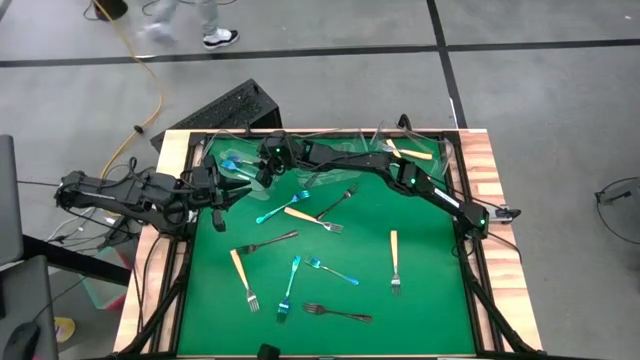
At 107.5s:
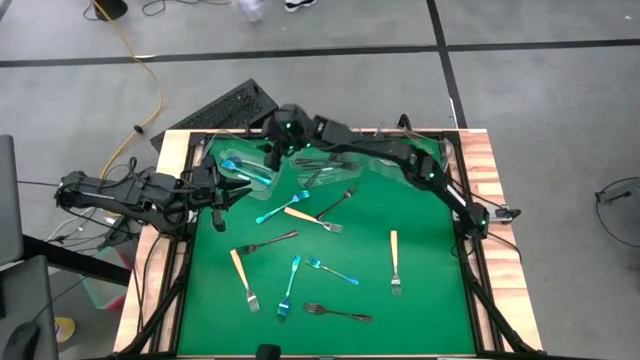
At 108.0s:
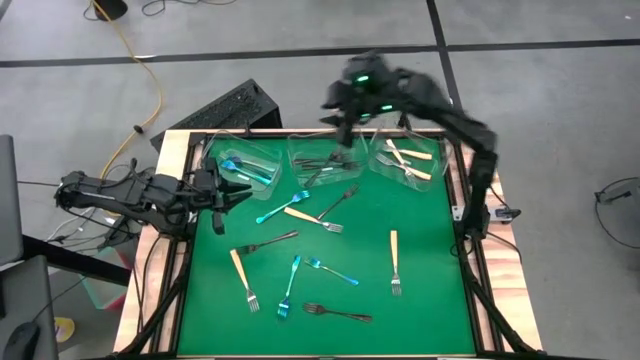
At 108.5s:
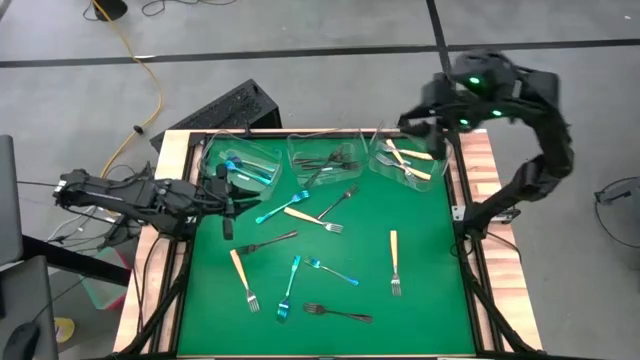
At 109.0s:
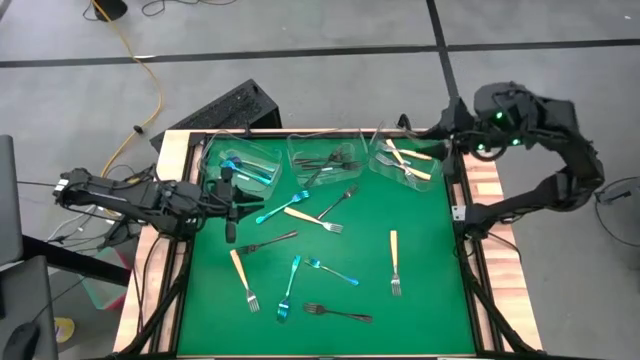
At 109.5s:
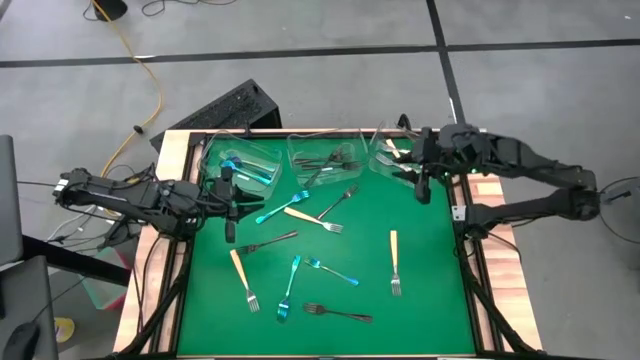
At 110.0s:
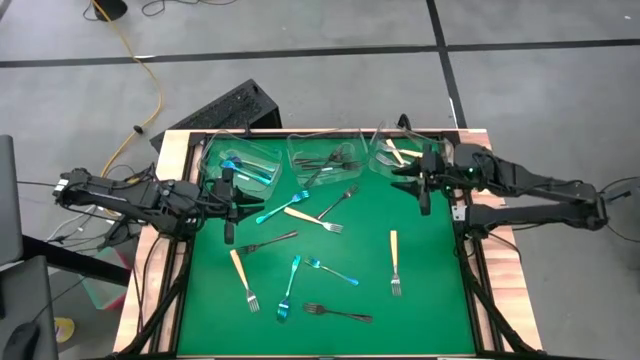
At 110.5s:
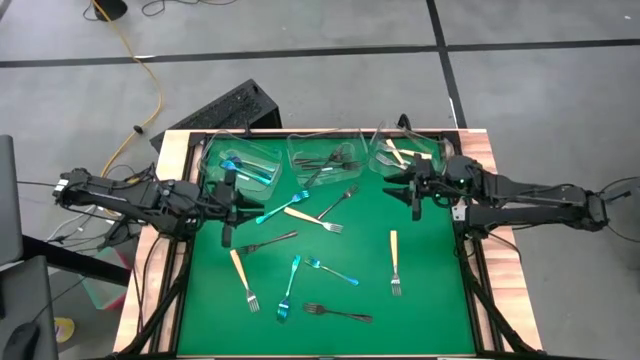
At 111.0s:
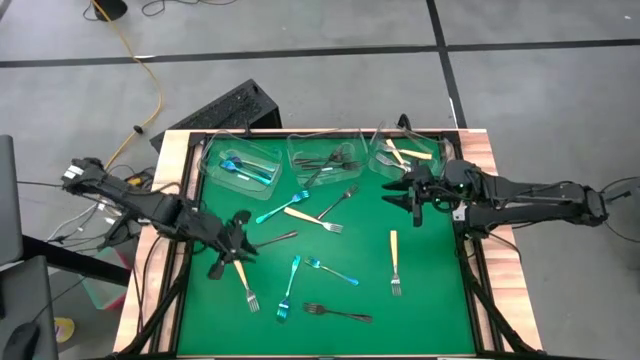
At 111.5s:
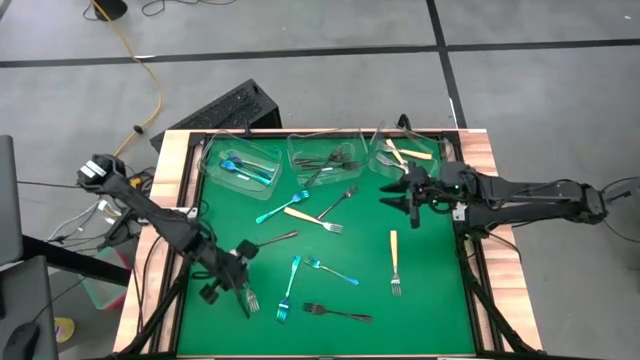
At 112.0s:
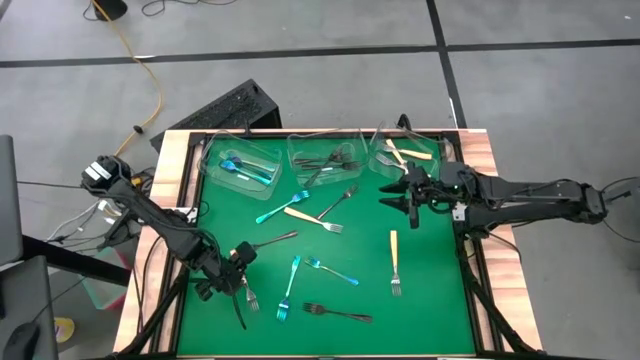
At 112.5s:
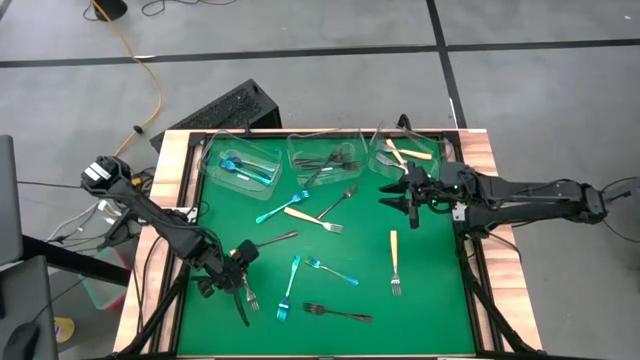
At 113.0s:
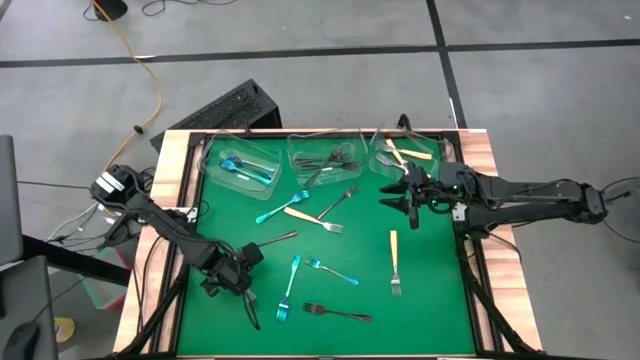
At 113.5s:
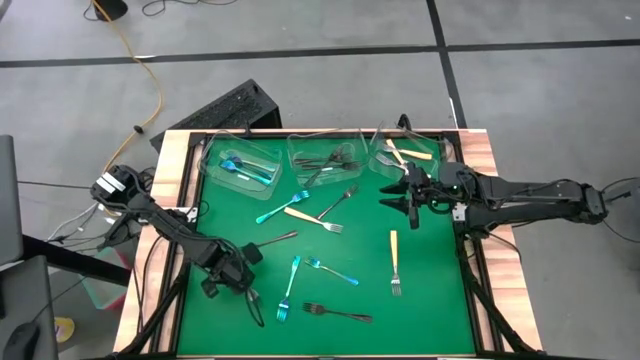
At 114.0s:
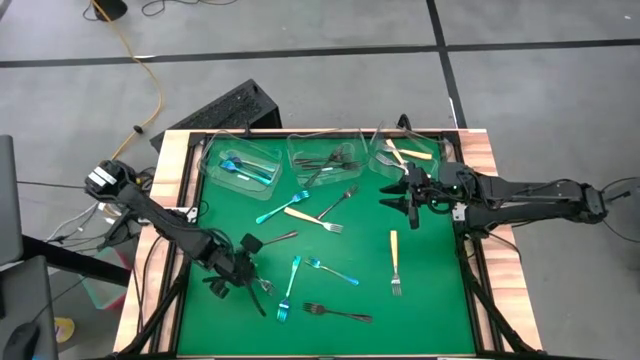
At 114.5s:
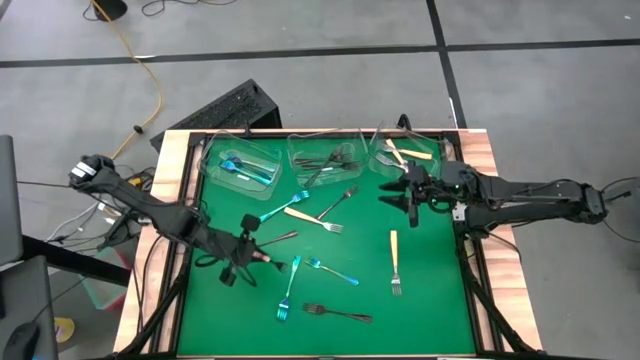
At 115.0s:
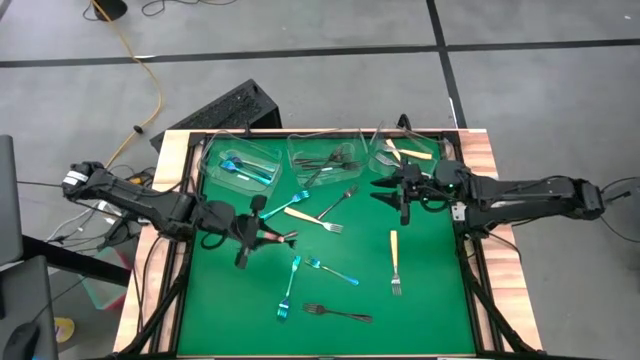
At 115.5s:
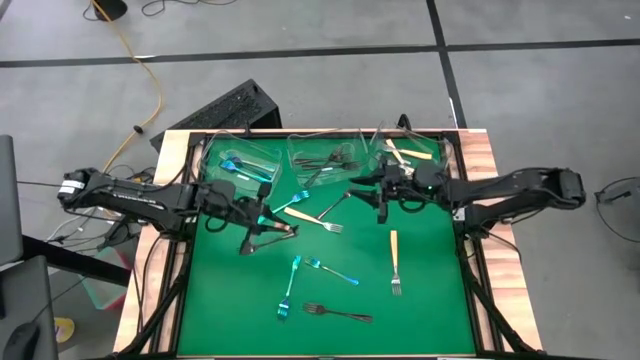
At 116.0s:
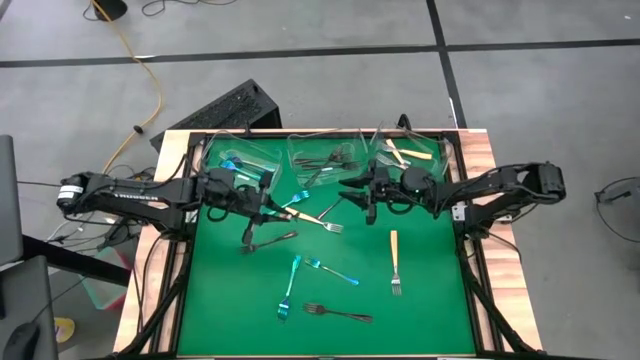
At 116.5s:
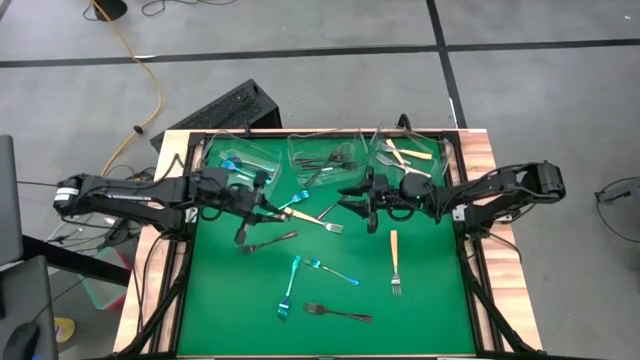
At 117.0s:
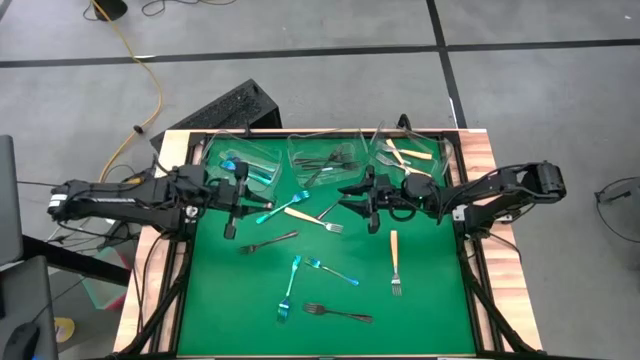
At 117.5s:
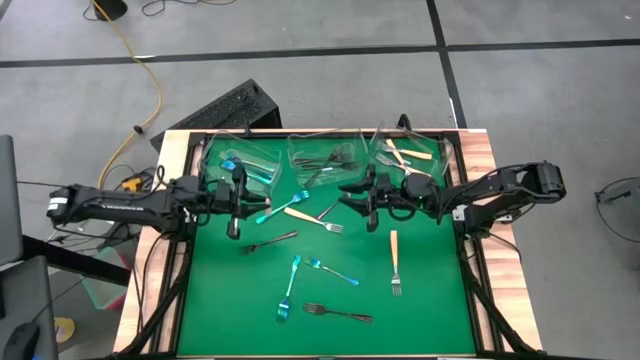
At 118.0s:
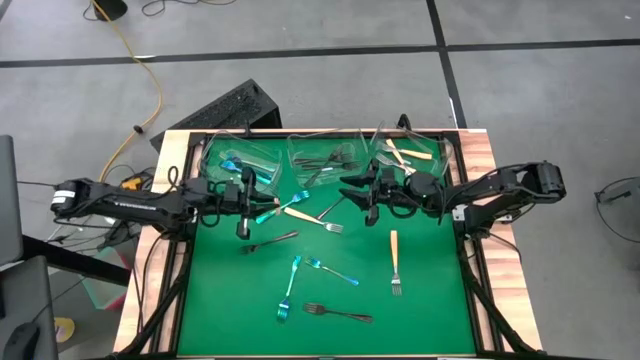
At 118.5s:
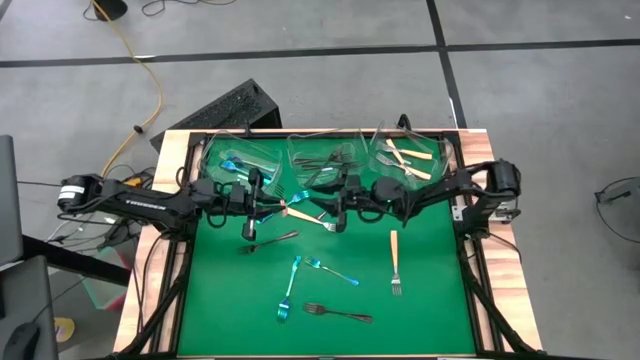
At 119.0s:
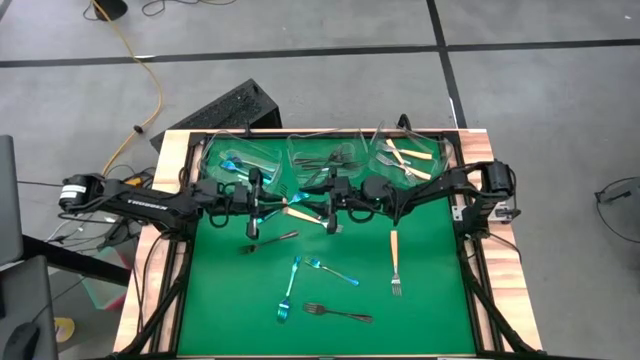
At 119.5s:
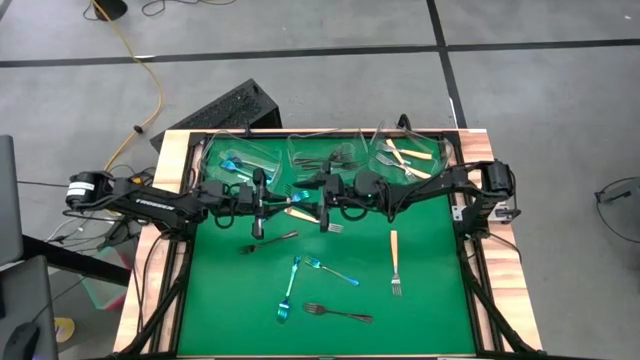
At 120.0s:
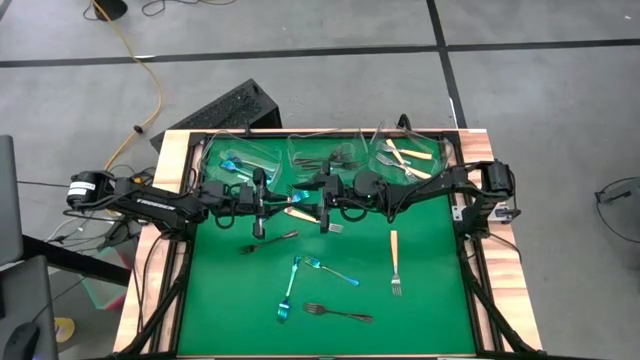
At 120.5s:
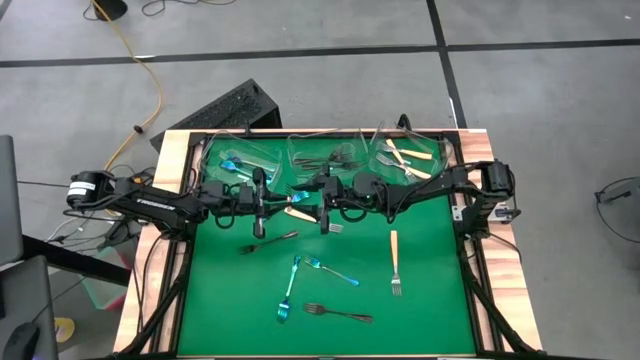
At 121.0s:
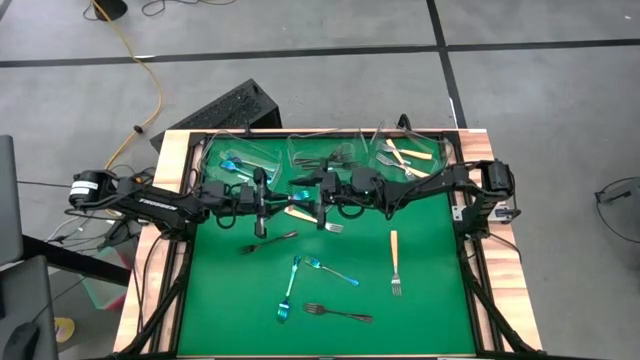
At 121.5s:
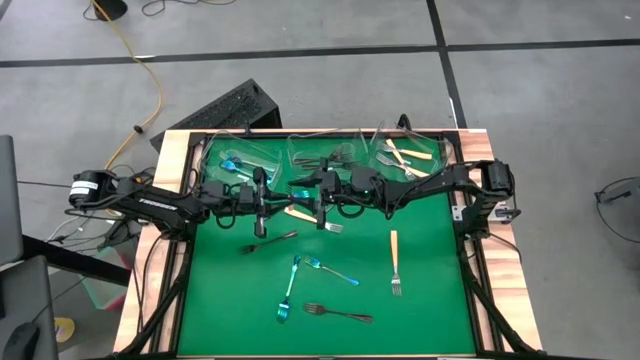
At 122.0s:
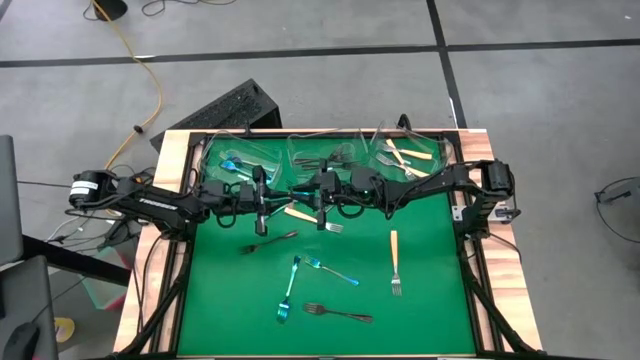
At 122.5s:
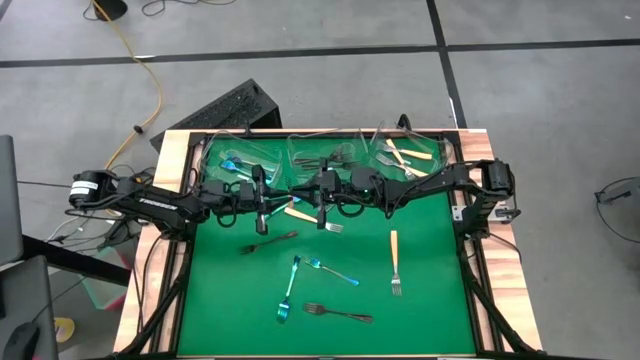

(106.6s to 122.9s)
Task: Sort silverware by color (type)
Put the yellow fork into the right transparent bin

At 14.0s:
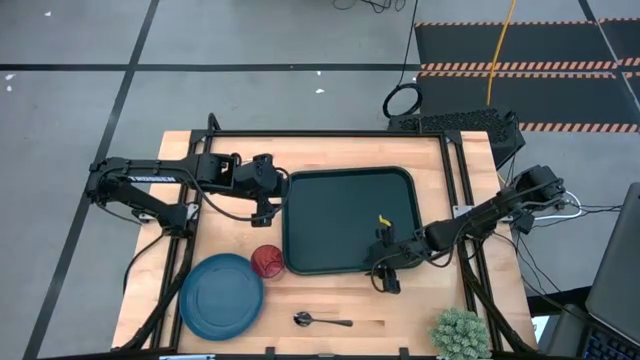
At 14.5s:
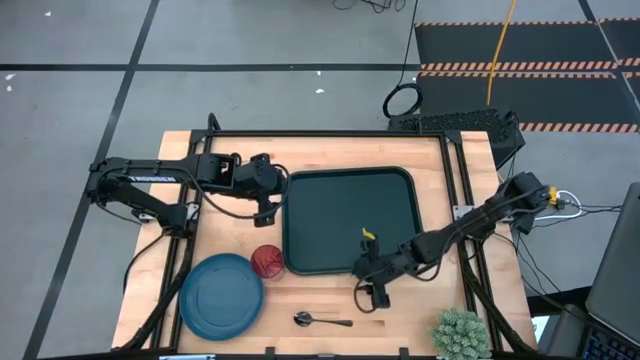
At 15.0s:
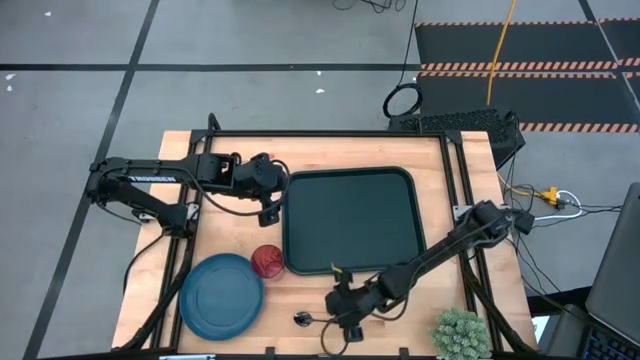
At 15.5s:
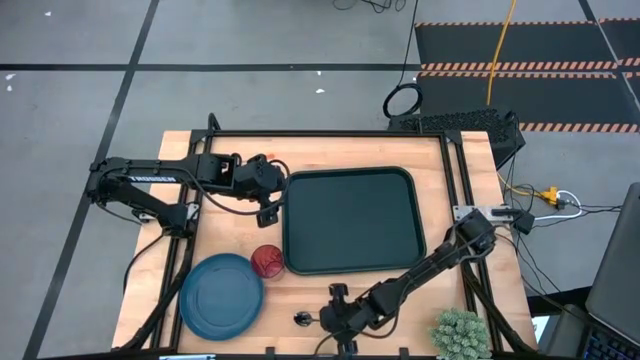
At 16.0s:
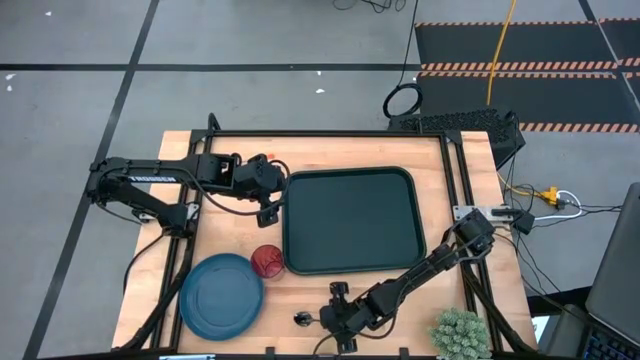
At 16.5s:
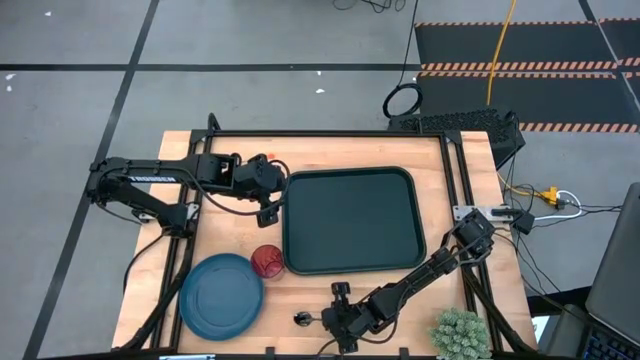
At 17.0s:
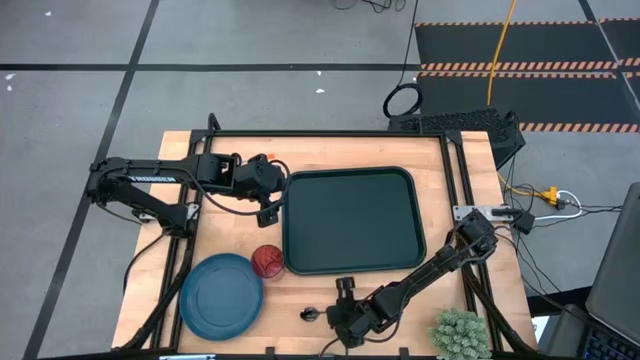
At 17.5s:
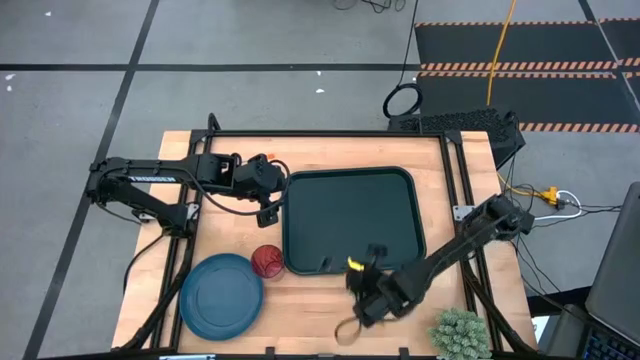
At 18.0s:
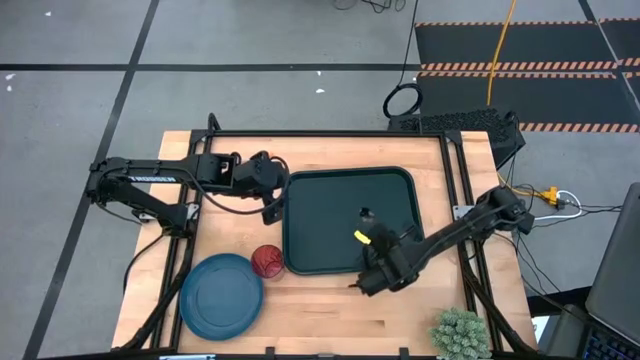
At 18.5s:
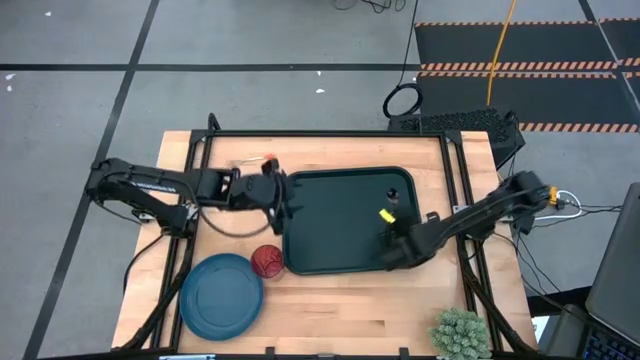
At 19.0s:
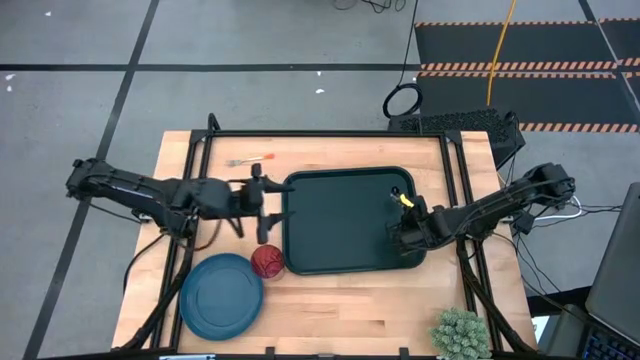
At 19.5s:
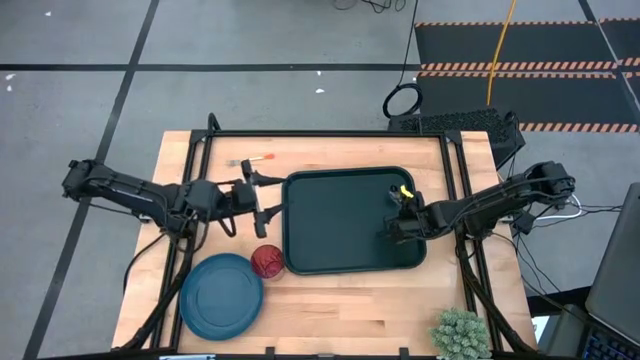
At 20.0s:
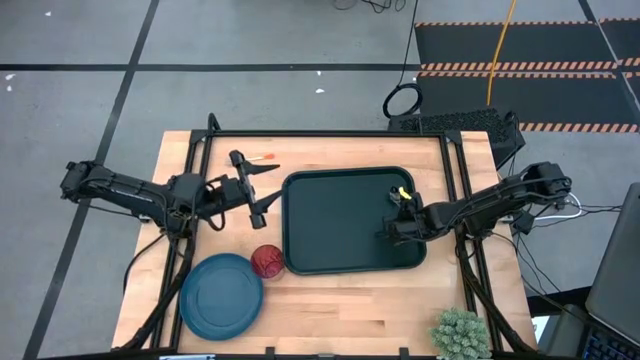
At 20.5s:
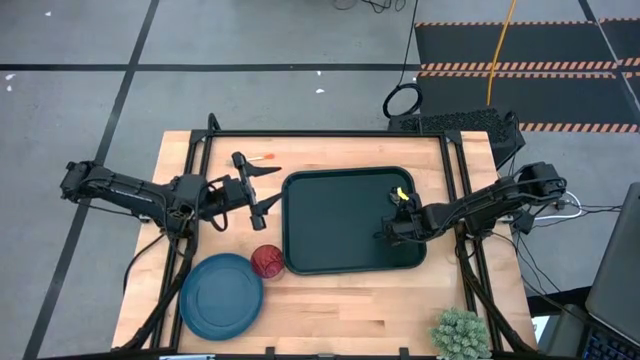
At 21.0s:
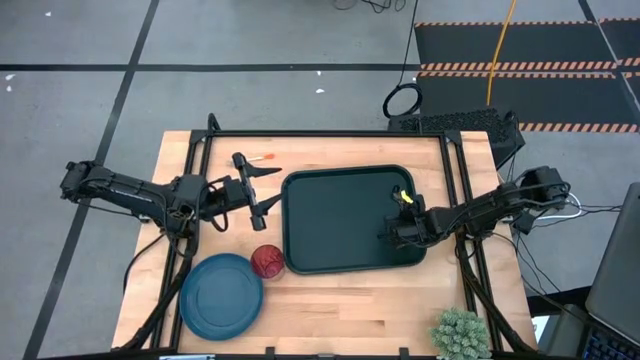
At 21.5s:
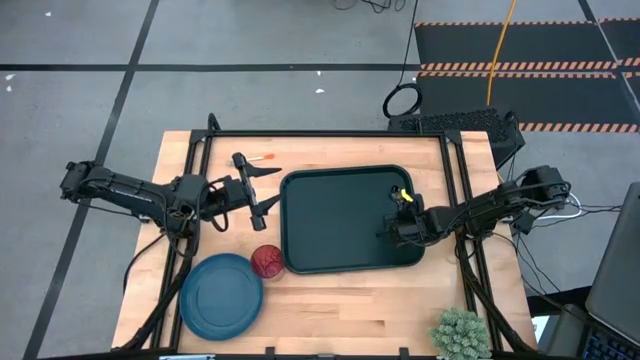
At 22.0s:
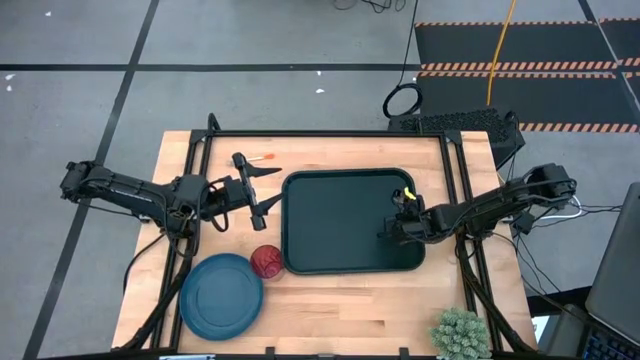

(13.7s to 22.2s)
Task: Pick and place plate/cup/fork/spoon on tray
Put the black spoon on the black tray
